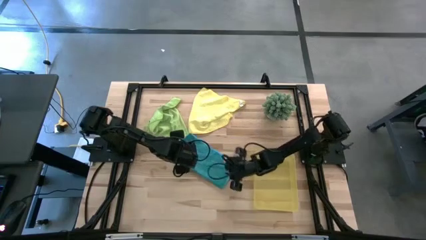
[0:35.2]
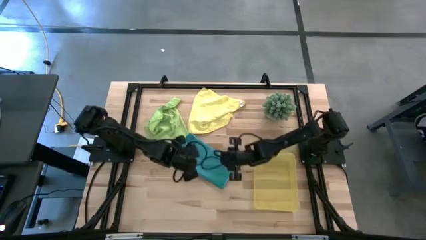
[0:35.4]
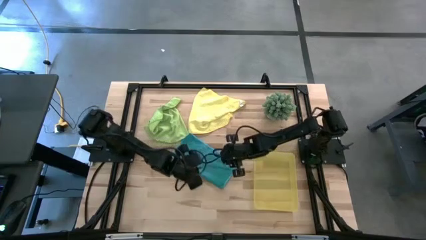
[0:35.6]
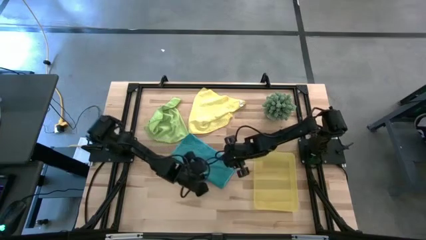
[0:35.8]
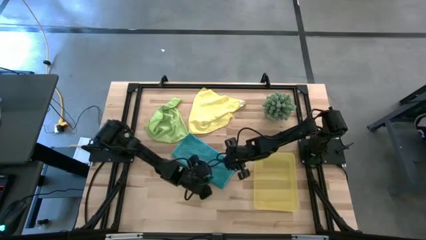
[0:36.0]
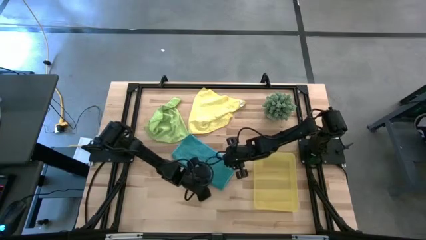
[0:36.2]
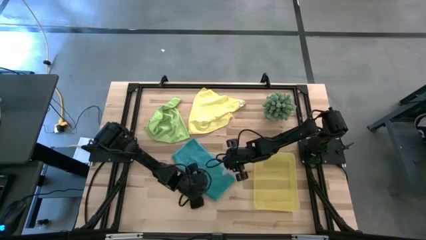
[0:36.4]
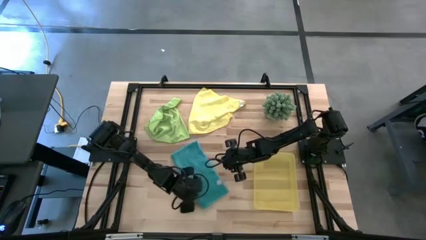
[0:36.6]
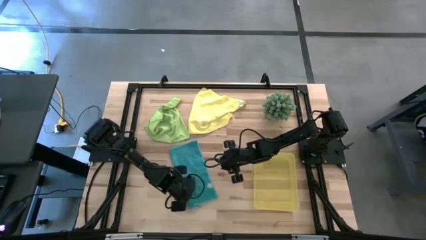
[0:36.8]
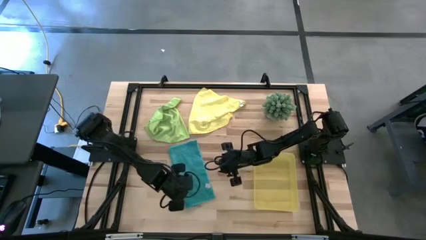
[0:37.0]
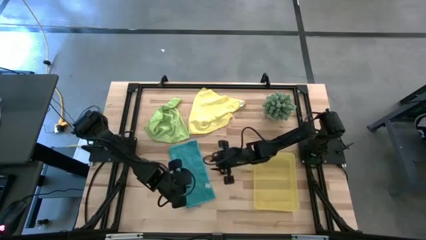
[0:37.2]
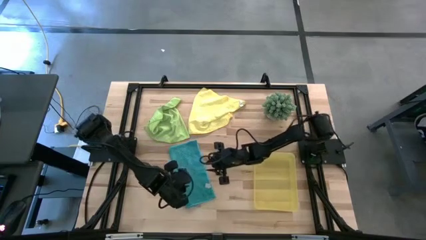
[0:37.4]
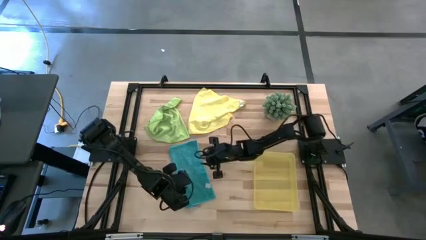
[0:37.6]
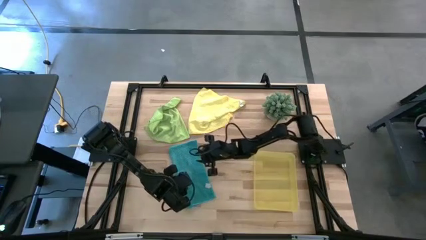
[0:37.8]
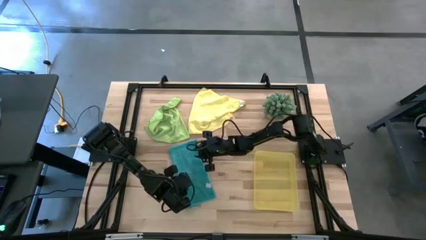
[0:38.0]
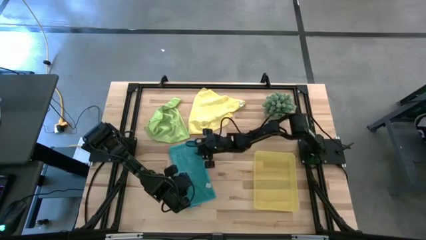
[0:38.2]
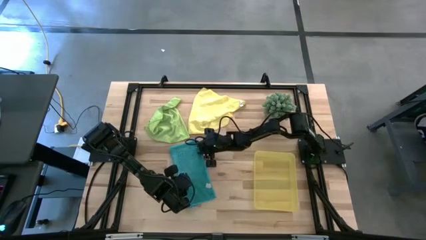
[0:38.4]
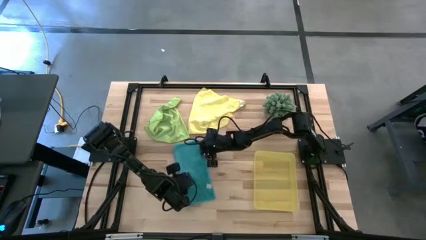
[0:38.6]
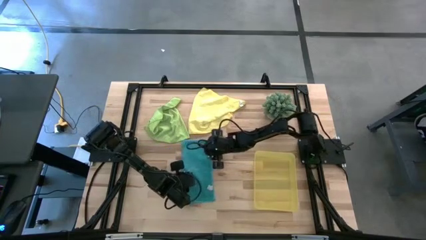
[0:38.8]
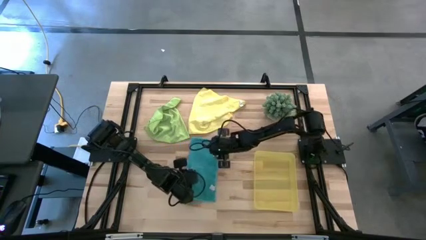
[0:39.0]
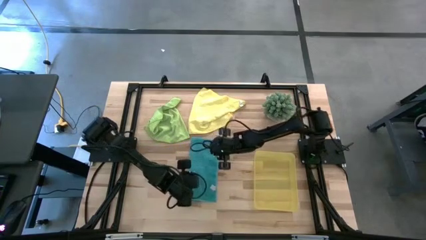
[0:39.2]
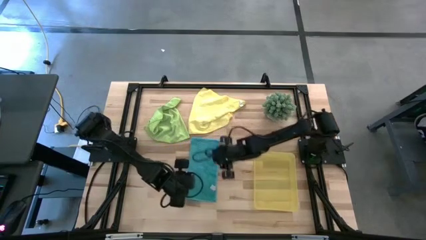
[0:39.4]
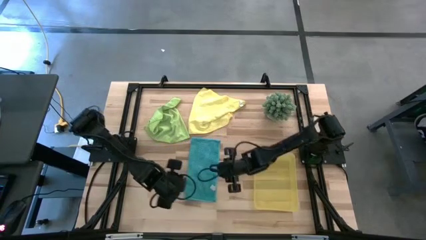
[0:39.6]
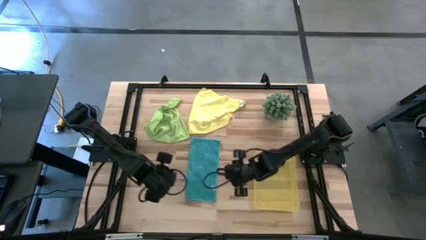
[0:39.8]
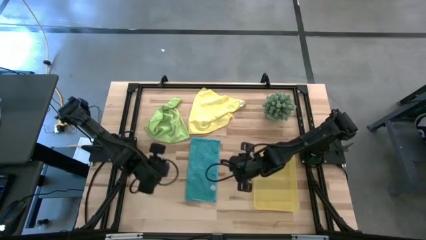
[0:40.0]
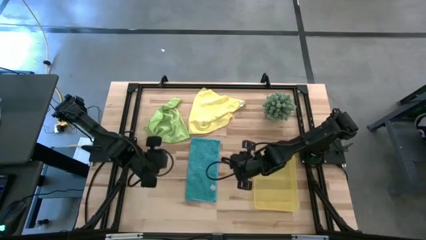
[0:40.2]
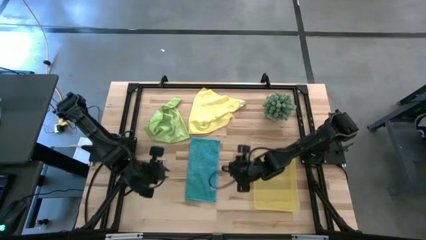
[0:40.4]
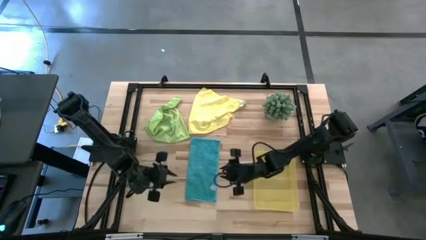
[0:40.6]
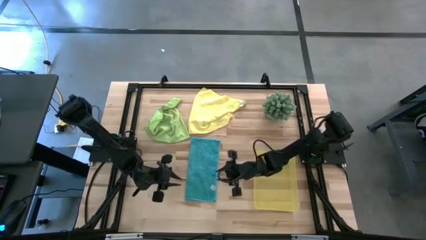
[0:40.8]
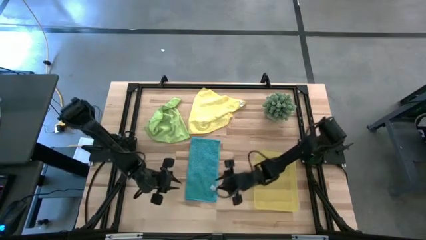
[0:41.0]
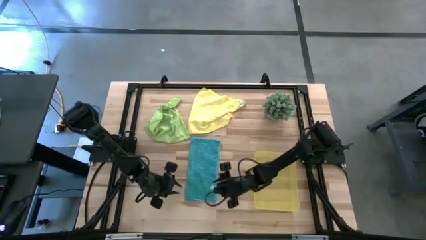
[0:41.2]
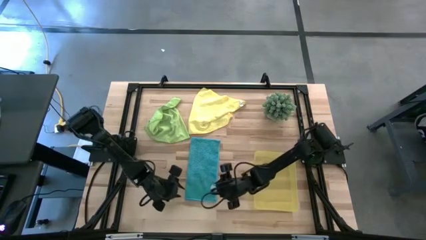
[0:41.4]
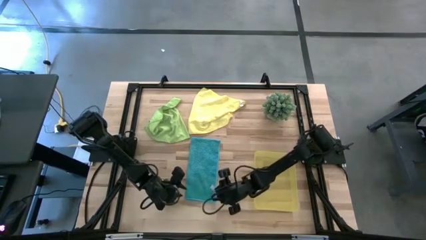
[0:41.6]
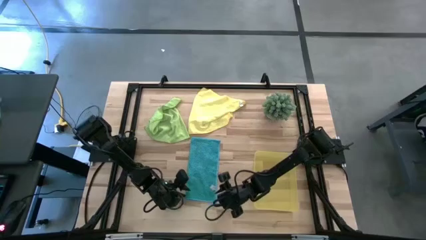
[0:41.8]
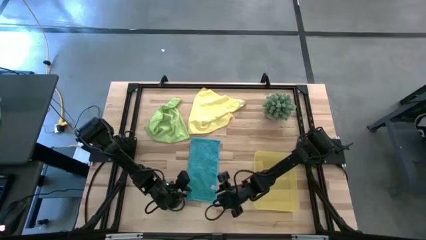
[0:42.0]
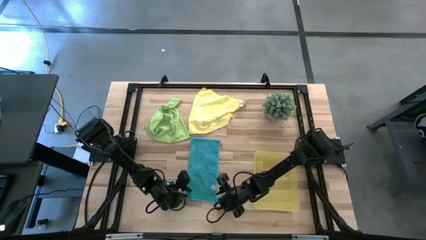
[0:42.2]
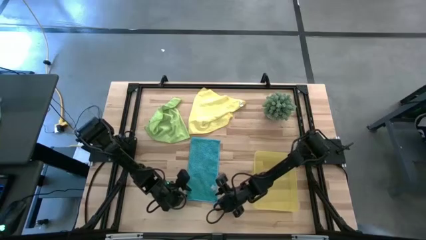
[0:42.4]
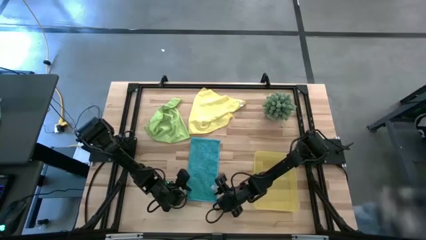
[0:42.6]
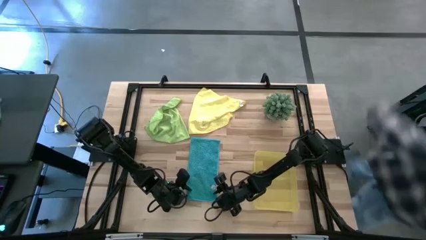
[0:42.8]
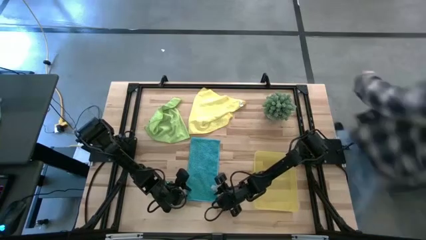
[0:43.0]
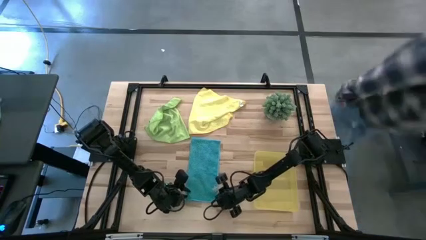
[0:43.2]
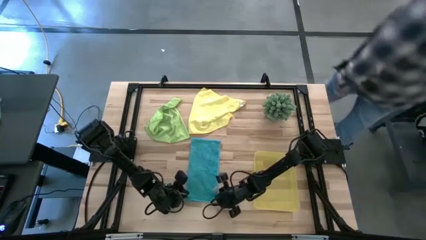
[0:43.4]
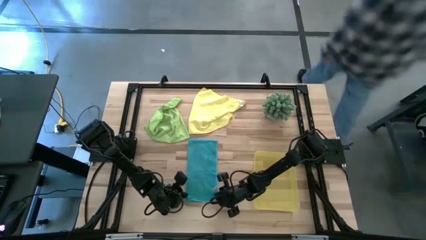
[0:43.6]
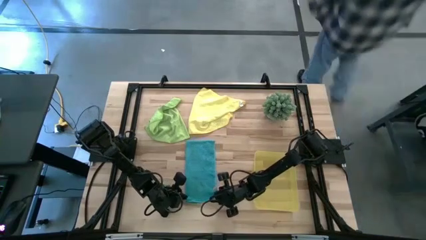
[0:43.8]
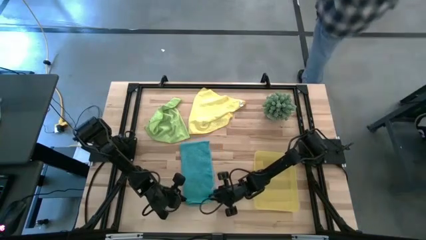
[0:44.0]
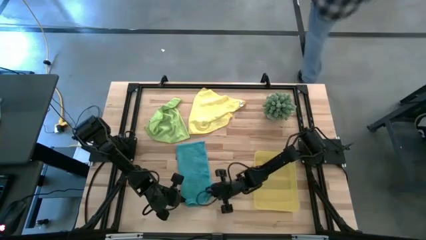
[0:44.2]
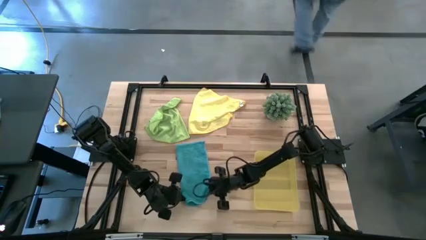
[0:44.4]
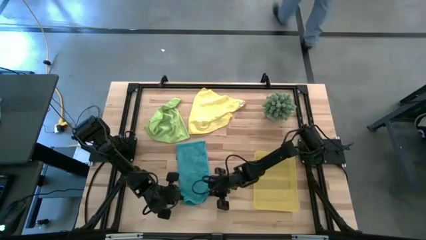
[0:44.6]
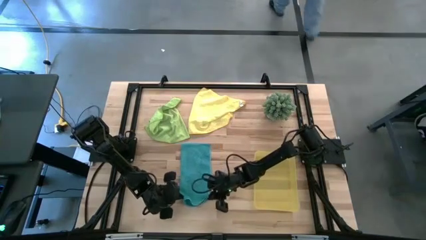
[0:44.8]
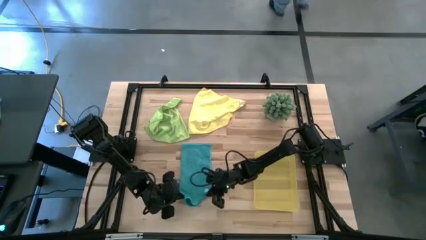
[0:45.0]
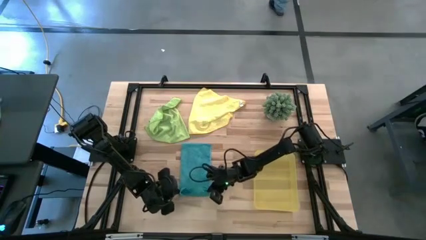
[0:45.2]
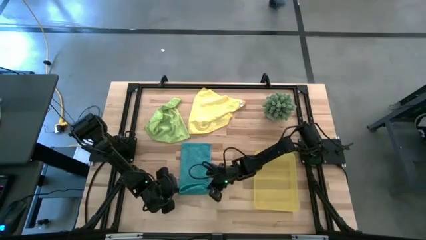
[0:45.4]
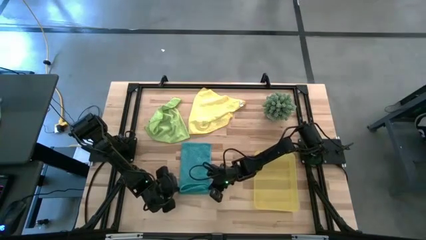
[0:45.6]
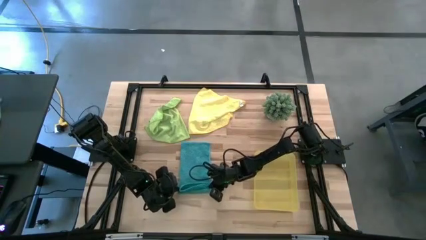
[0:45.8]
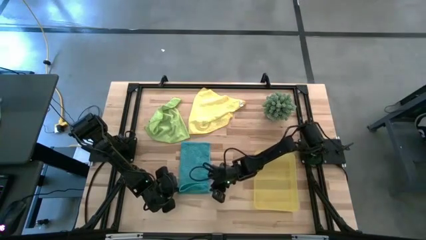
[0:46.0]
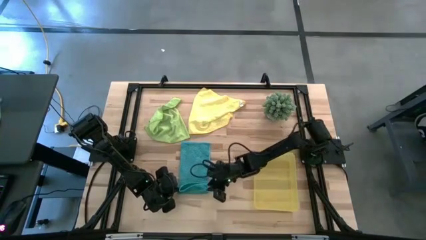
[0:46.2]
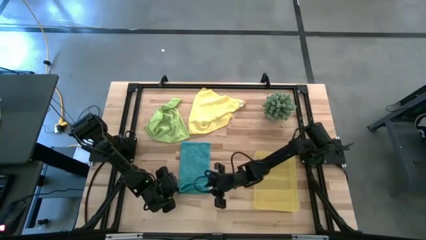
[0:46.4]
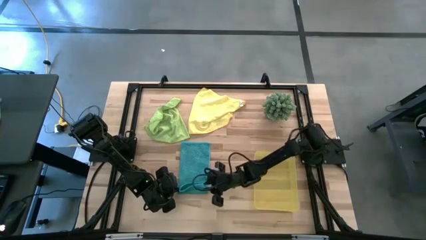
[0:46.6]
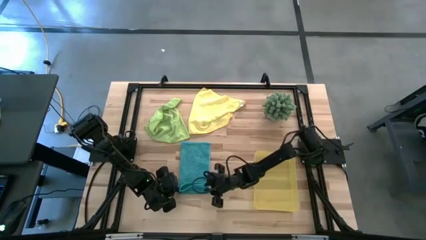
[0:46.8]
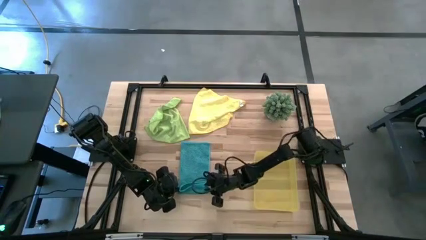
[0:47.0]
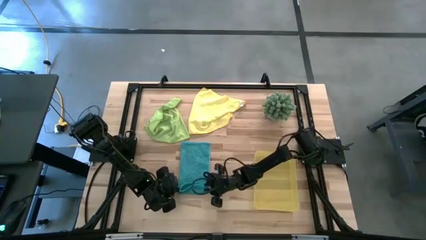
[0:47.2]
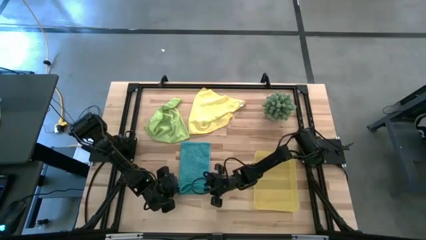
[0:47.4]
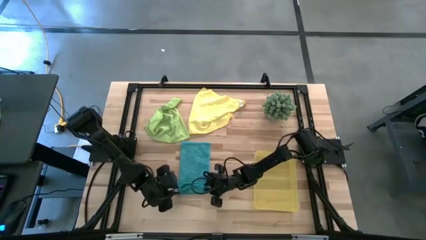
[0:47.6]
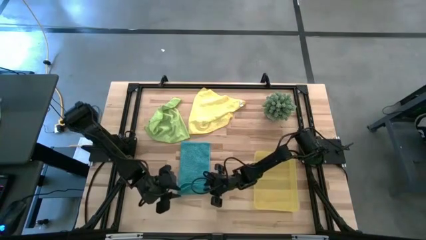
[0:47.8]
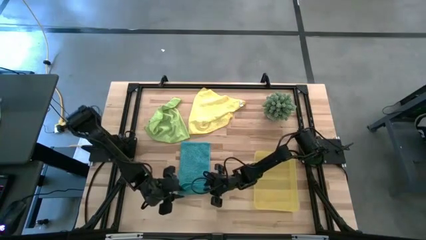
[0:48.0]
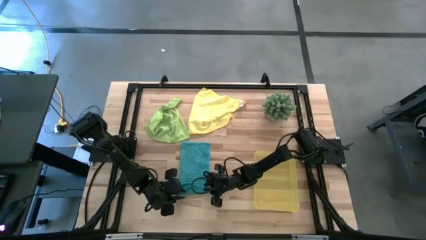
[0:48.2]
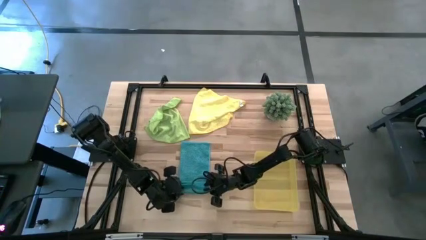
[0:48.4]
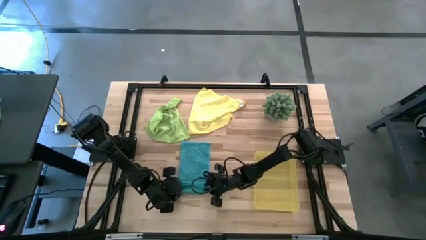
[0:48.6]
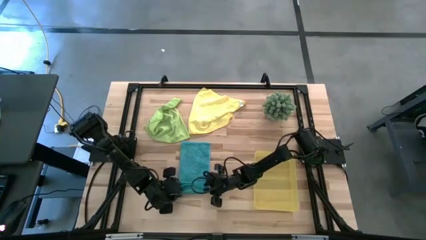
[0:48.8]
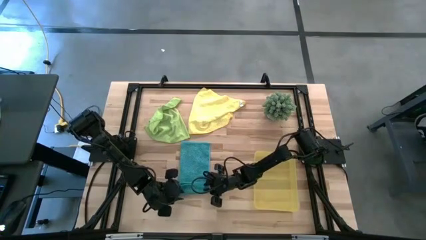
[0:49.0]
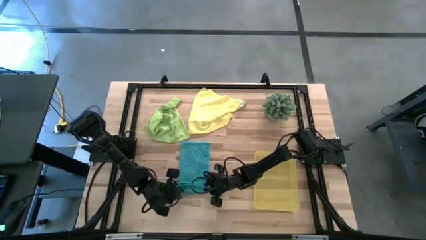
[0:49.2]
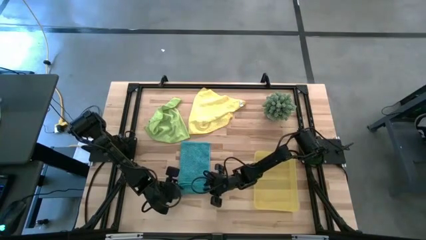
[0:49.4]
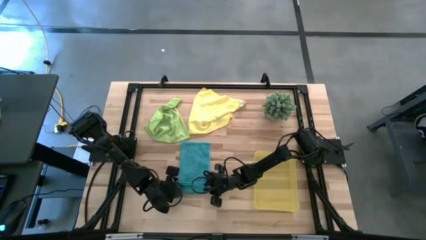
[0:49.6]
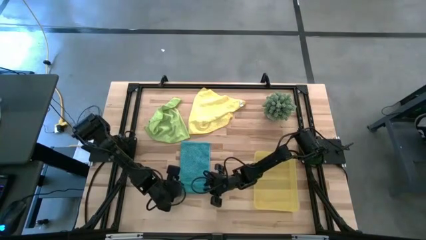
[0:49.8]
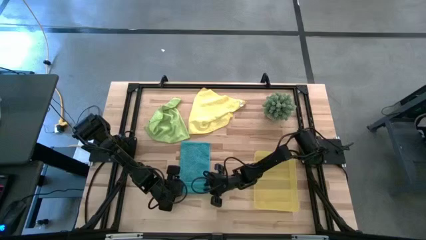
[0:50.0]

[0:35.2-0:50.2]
Task: Roll microfiber towels into tight, uniform cylinder then place into a basket
Roll the blue microfiber cloth
